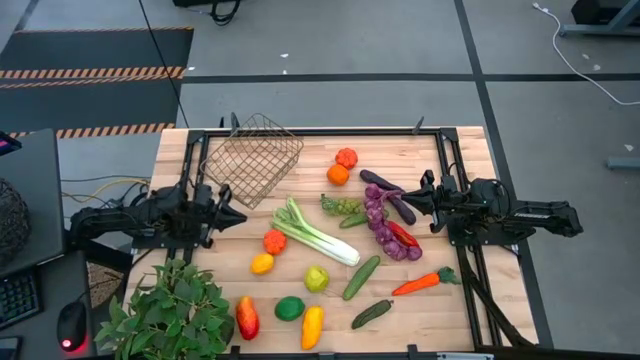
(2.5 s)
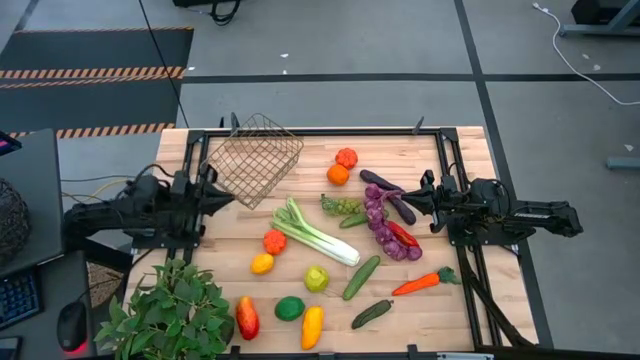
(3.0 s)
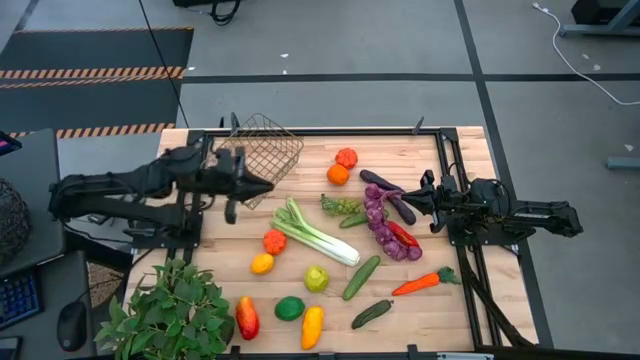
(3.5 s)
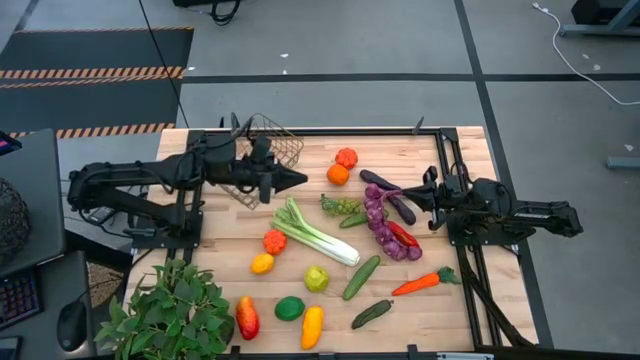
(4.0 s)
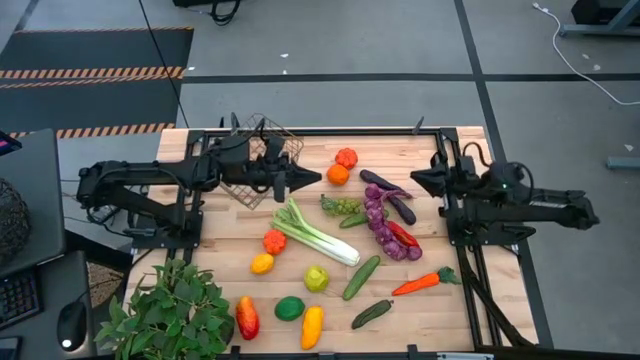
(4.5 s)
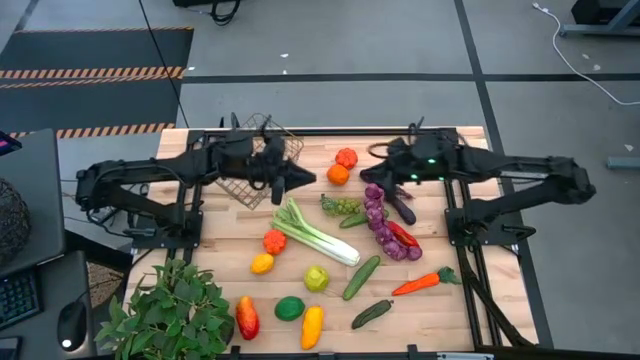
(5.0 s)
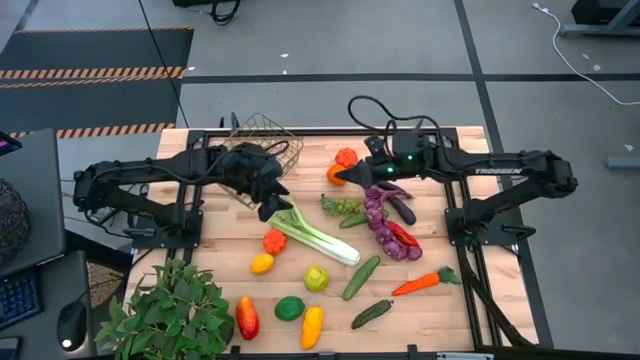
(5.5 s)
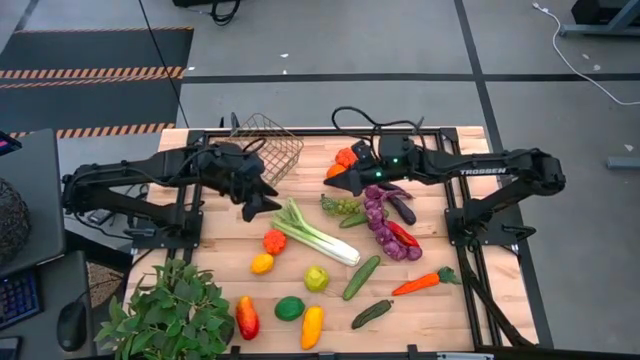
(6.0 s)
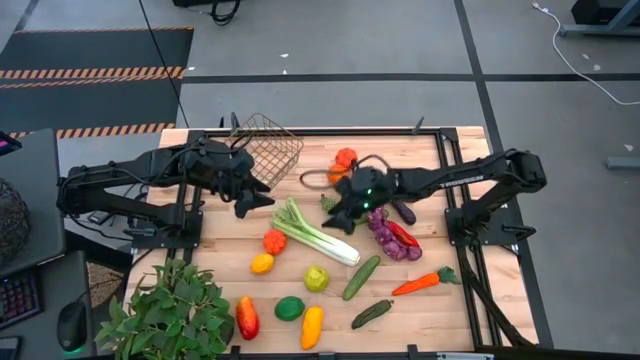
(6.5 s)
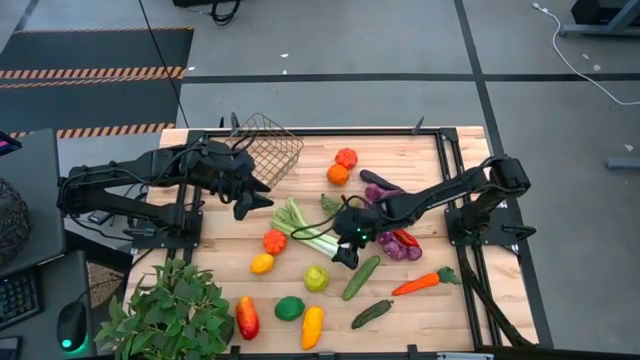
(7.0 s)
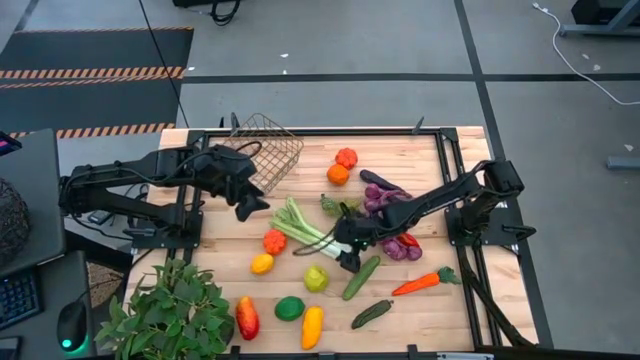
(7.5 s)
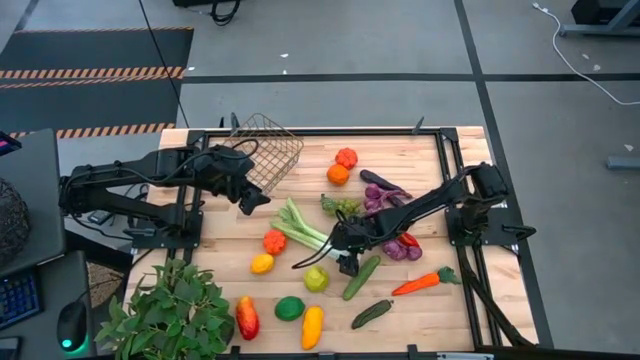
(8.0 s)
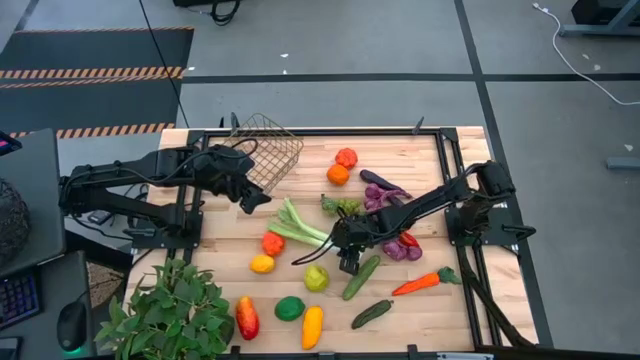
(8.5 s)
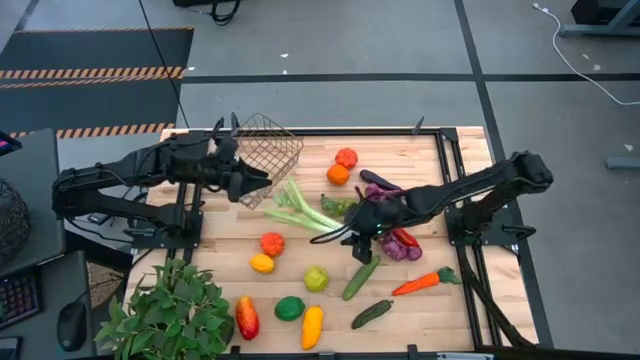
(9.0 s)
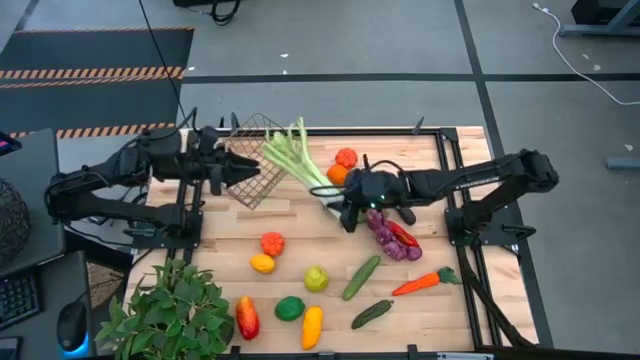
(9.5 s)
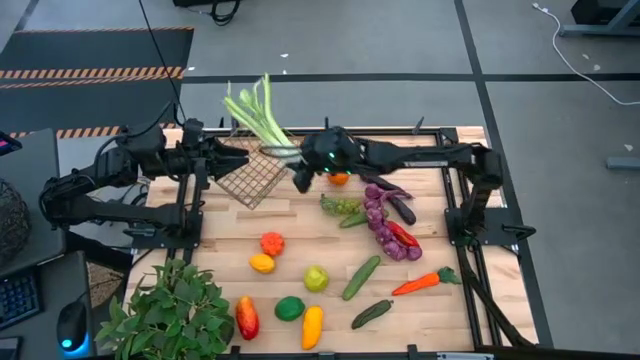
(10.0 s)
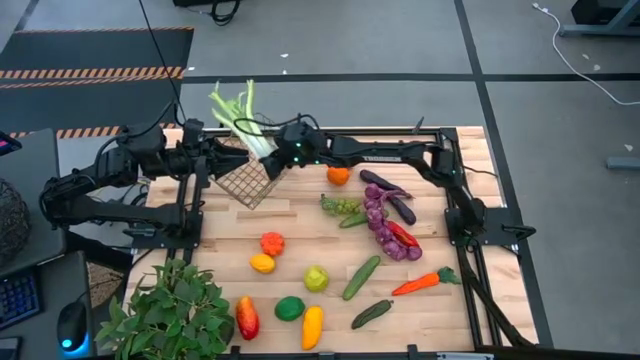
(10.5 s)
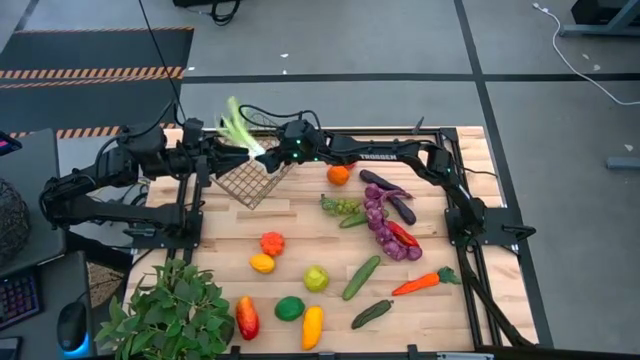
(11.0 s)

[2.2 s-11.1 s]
Task: Build produce basket
Put the celery into the wire basket

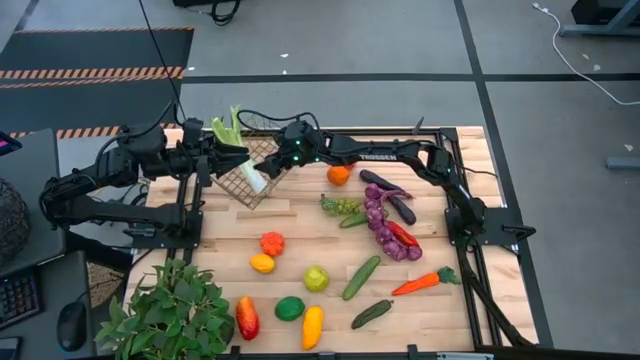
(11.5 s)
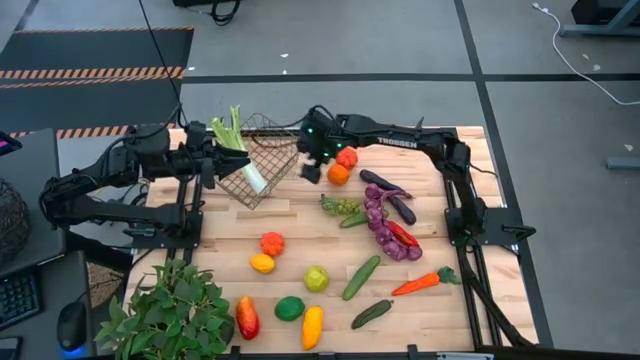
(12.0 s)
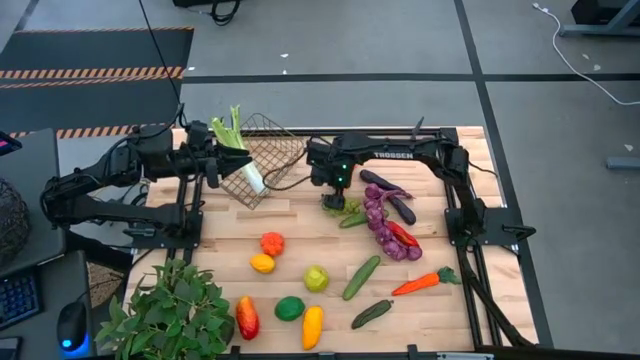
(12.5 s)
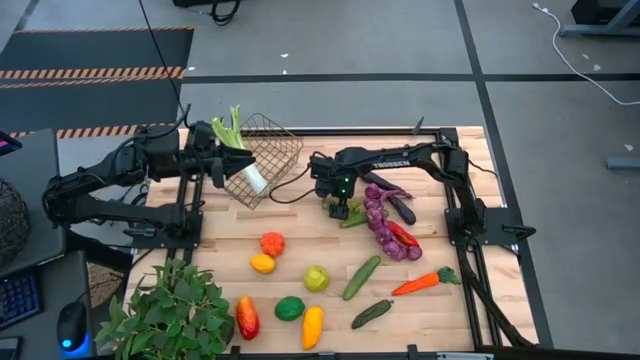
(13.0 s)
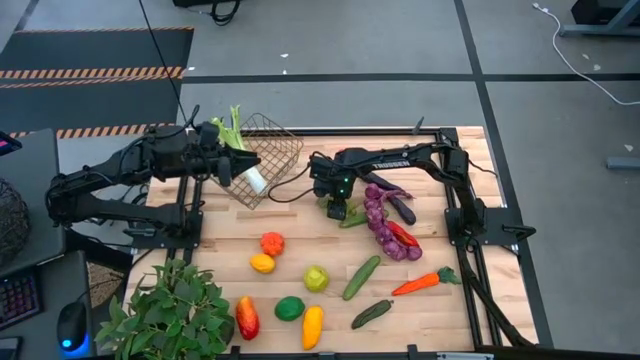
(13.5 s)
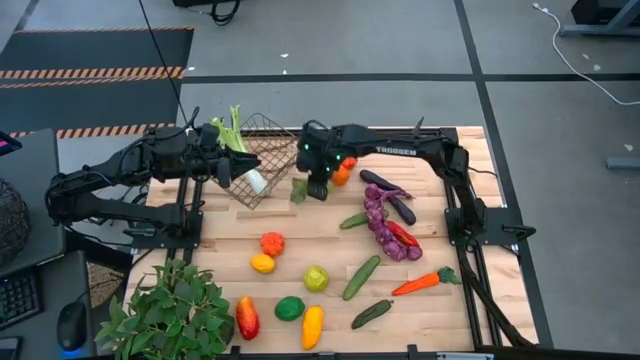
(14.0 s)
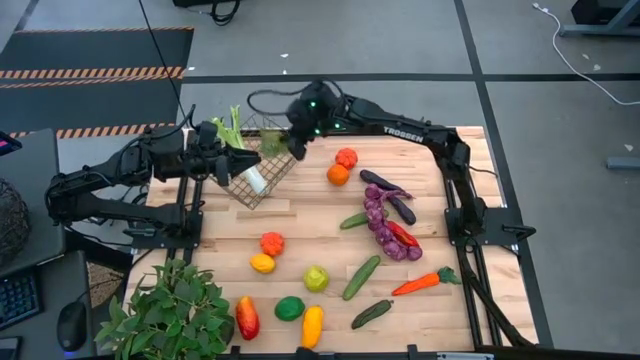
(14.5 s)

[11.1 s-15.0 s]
Put the grapes into the wire basket

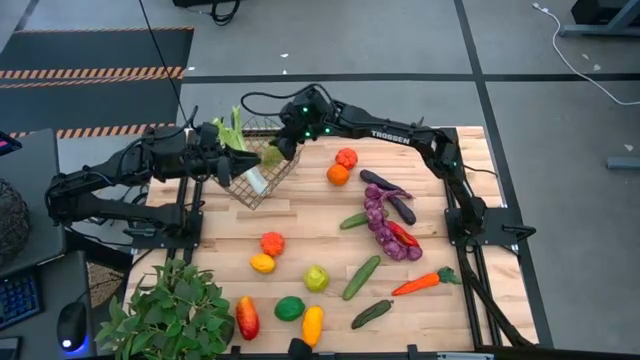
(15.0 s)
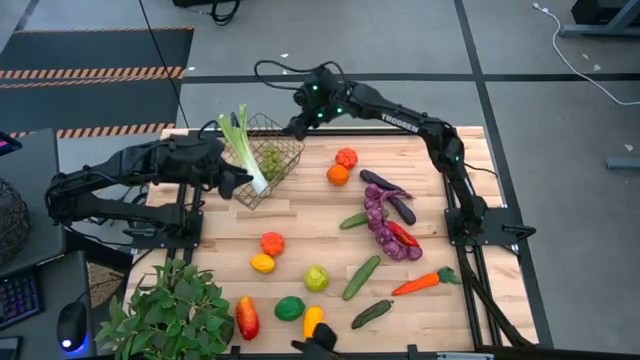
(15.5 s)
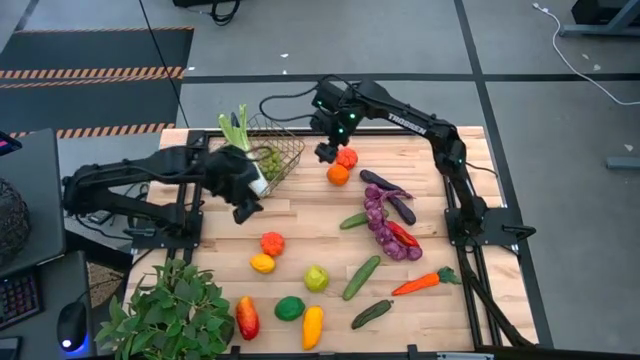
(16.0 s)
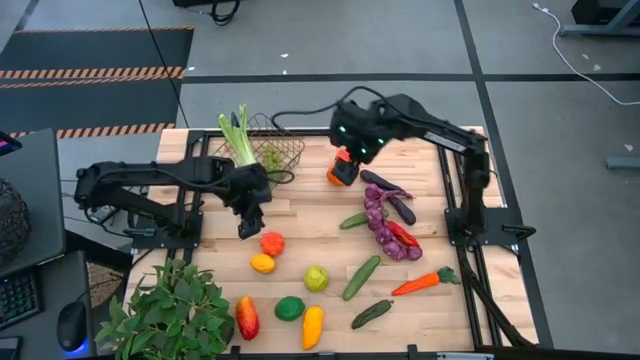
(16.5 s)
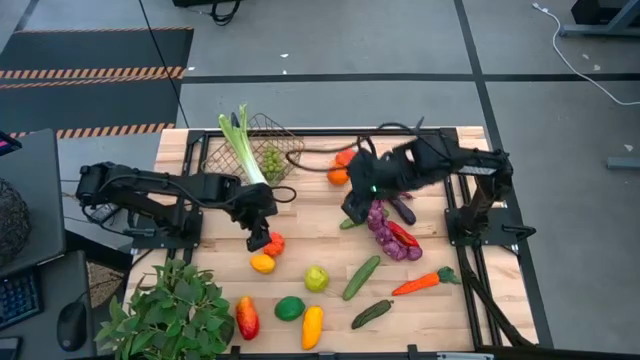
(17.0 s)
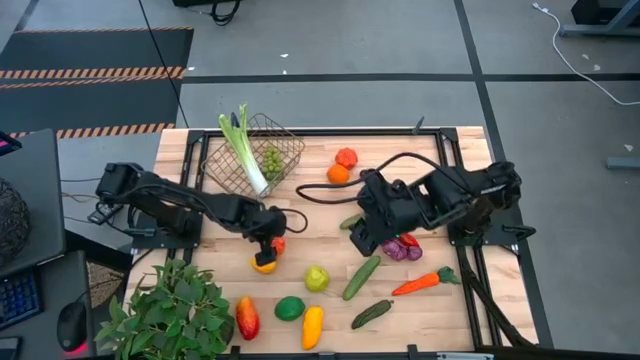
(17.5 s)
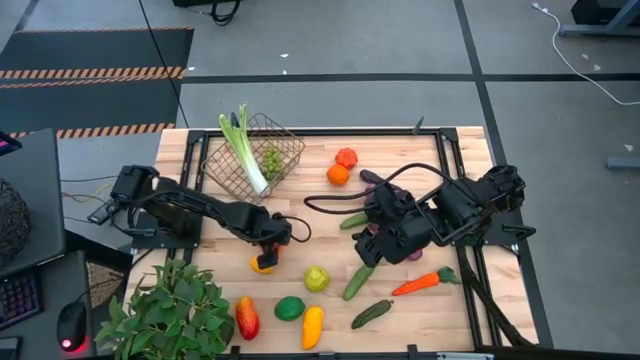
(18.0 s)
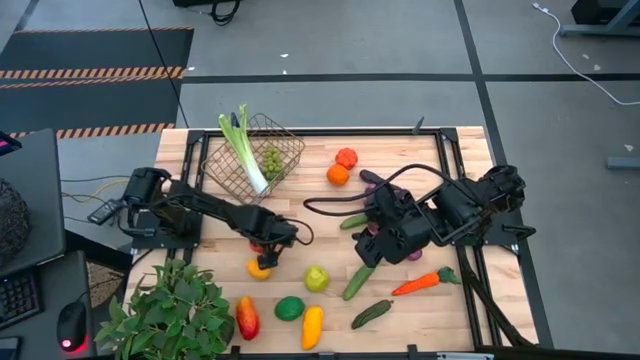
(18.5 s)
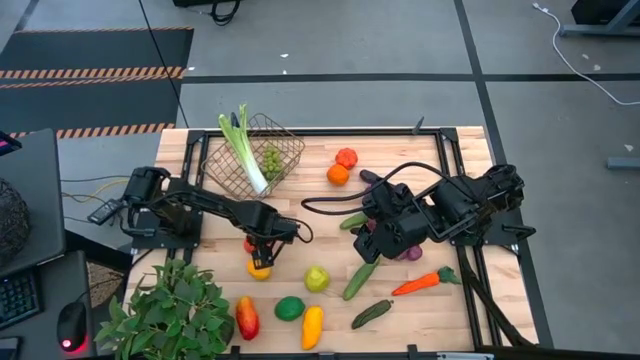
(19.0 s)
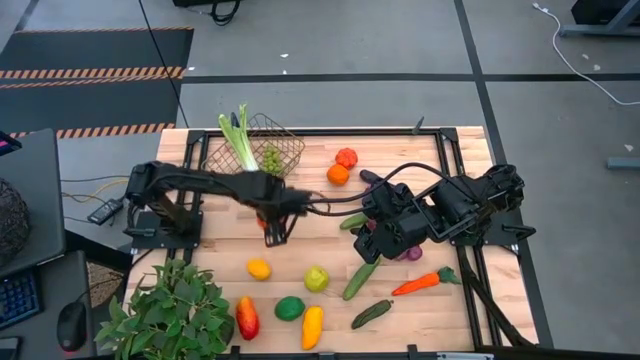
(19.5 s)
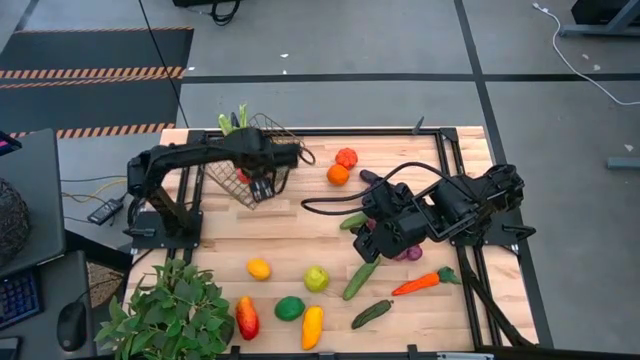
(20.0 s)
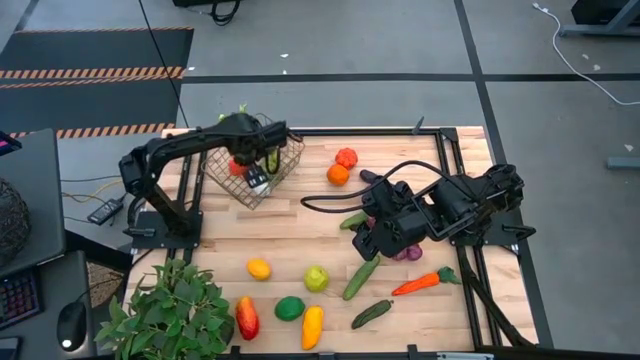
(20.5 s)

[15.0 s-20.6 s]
Put the bottom squash into the wire basket

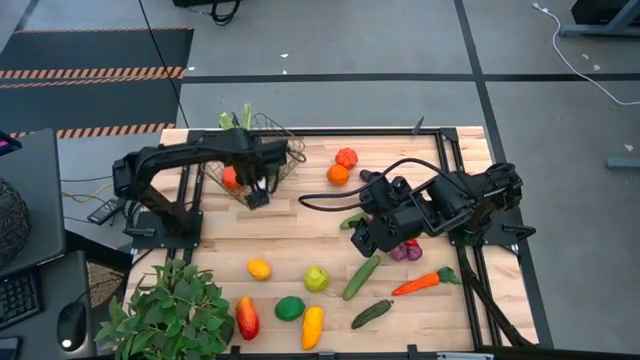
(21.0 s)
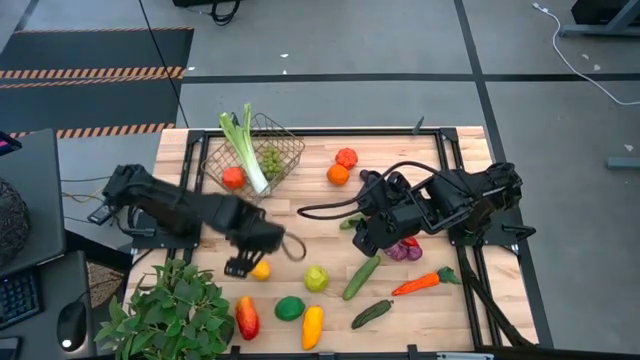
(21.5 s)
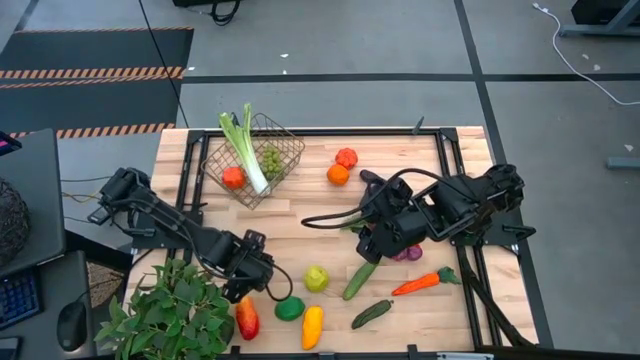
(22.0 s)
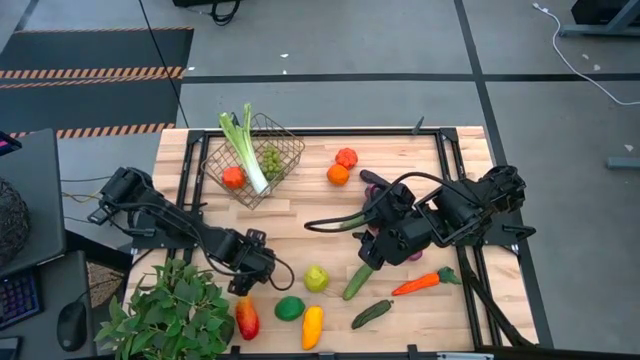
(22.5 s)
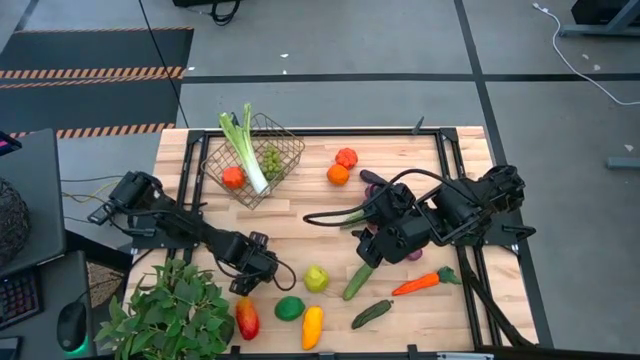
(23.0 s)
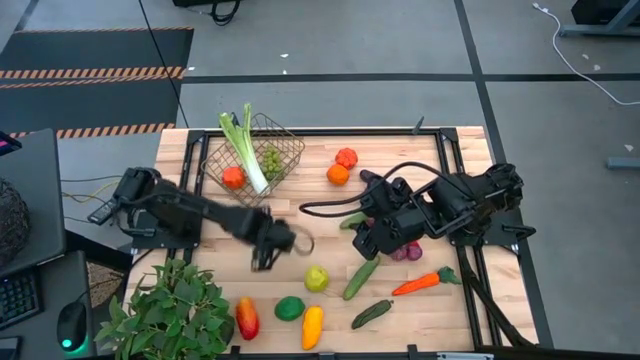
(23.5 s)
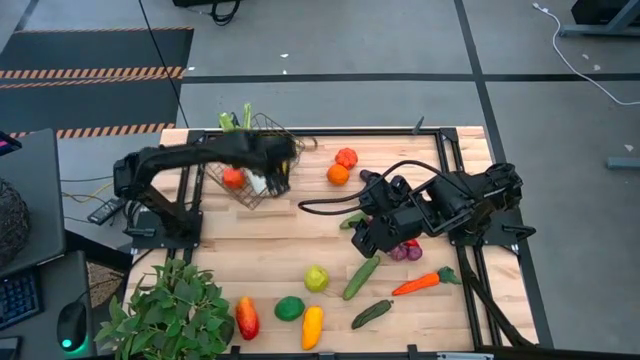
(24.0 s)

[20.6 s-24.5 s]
Put the lemon into the wire basket
